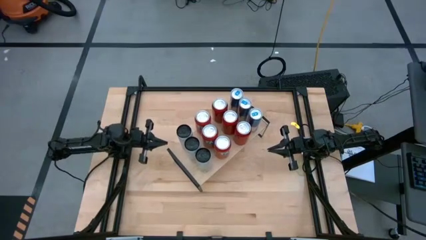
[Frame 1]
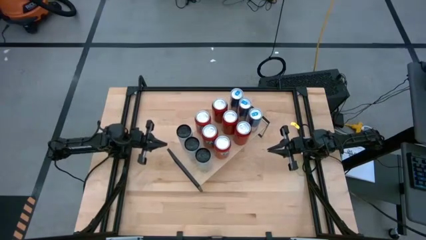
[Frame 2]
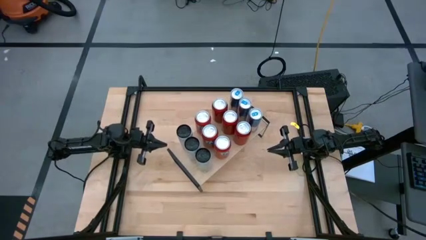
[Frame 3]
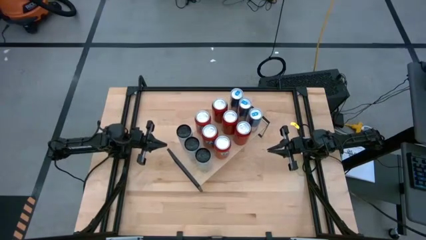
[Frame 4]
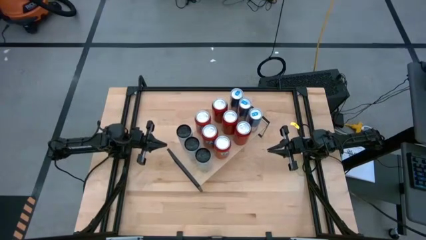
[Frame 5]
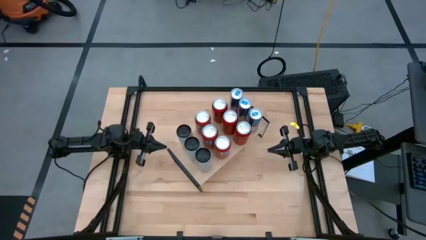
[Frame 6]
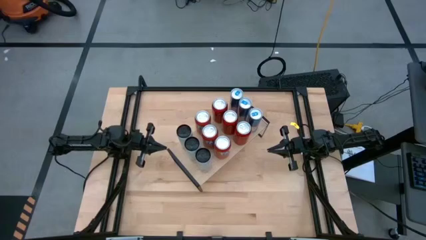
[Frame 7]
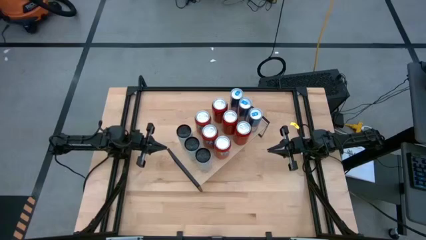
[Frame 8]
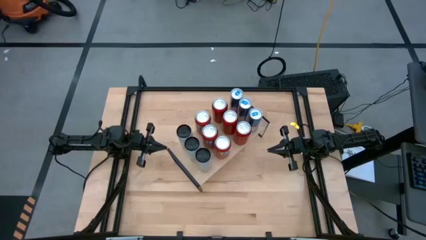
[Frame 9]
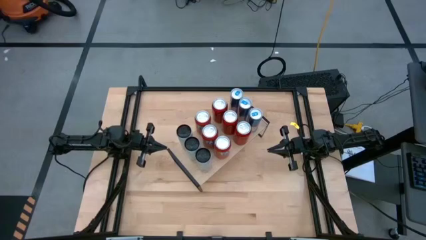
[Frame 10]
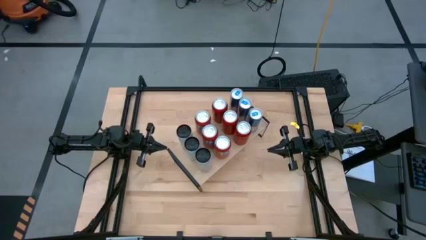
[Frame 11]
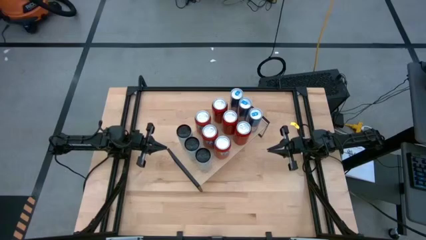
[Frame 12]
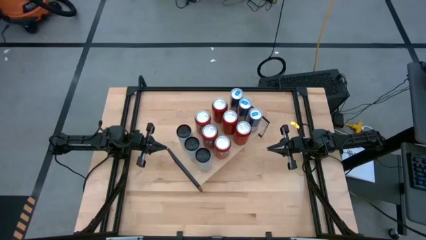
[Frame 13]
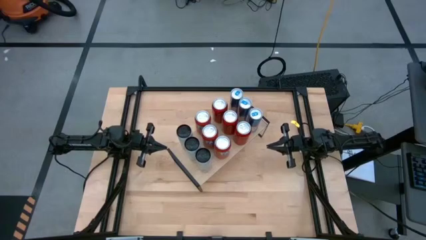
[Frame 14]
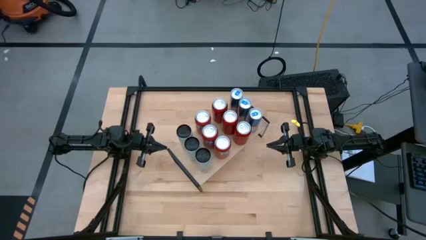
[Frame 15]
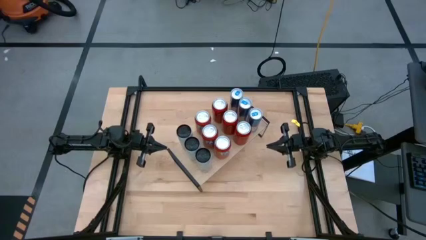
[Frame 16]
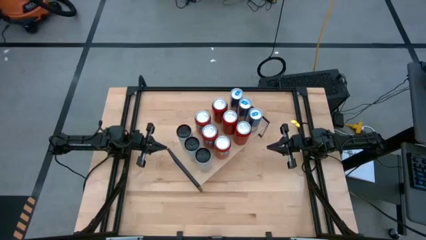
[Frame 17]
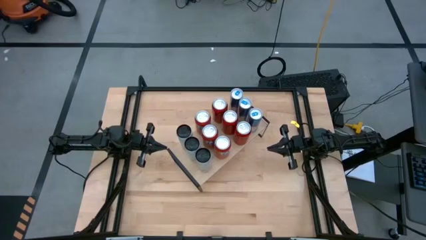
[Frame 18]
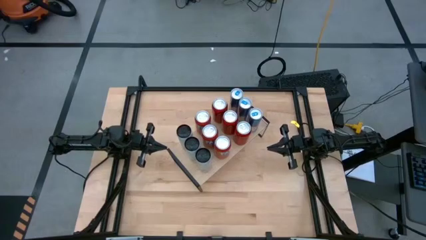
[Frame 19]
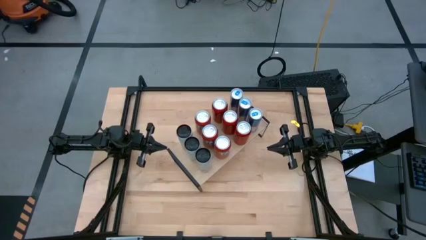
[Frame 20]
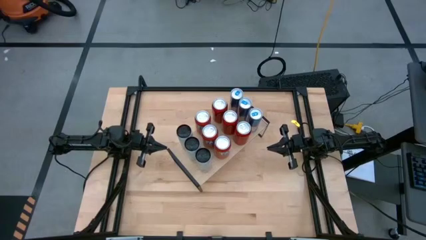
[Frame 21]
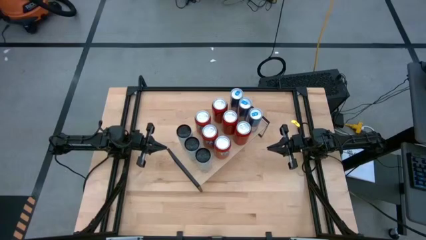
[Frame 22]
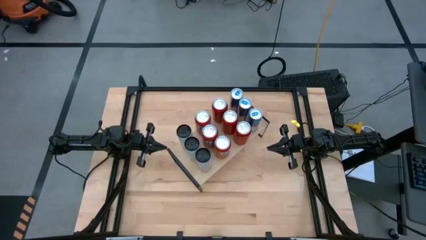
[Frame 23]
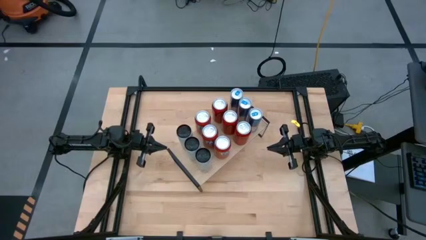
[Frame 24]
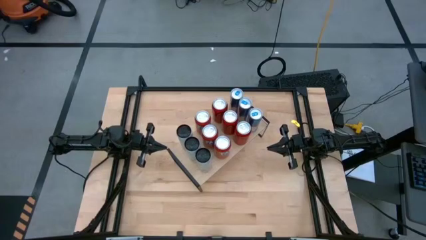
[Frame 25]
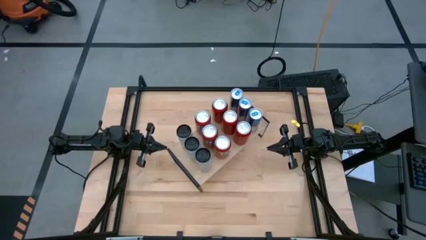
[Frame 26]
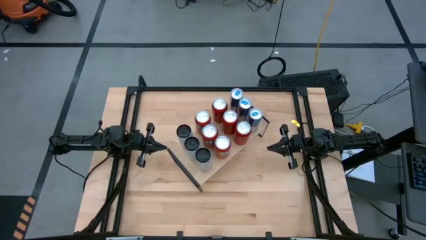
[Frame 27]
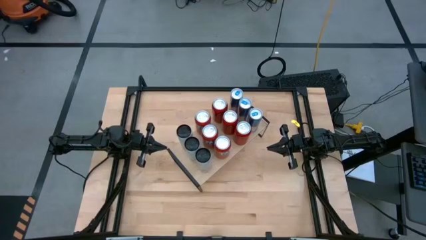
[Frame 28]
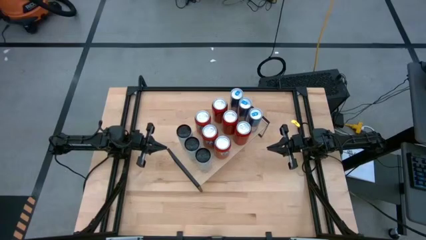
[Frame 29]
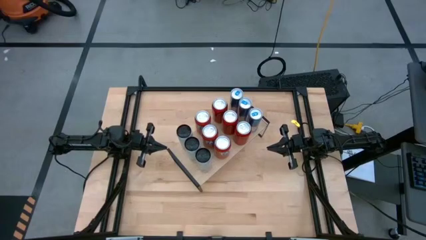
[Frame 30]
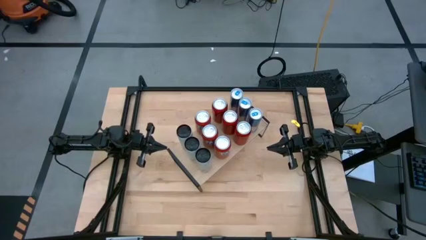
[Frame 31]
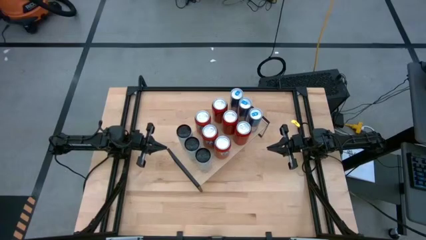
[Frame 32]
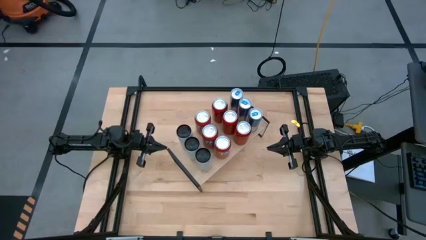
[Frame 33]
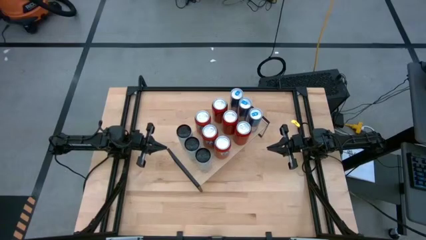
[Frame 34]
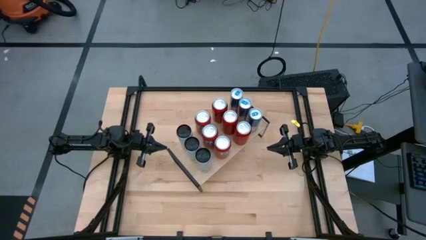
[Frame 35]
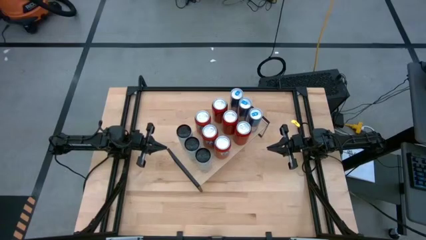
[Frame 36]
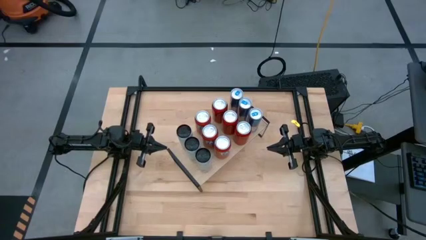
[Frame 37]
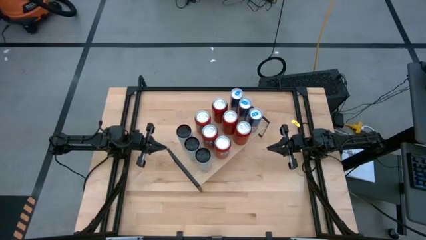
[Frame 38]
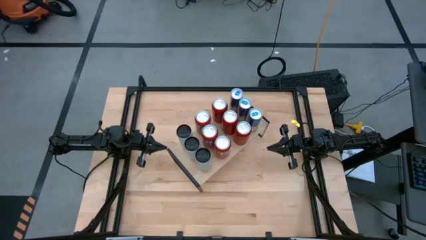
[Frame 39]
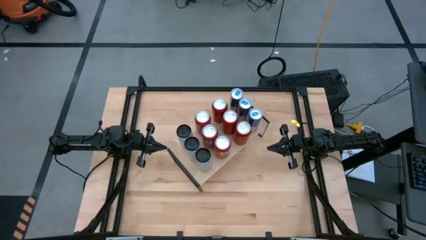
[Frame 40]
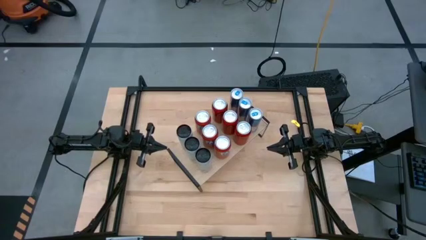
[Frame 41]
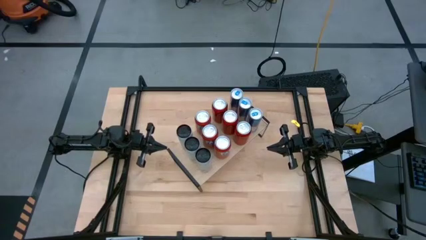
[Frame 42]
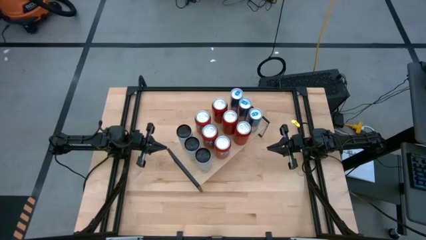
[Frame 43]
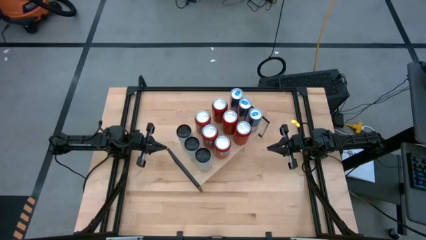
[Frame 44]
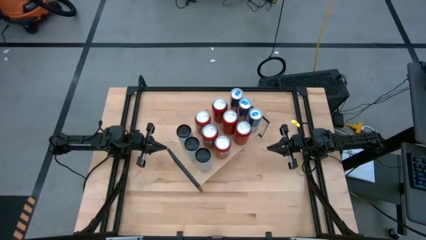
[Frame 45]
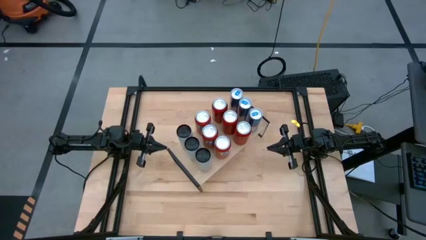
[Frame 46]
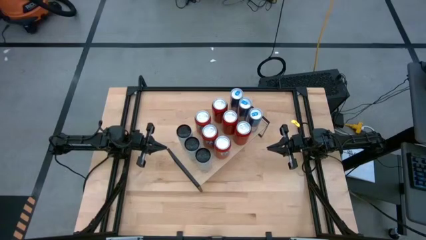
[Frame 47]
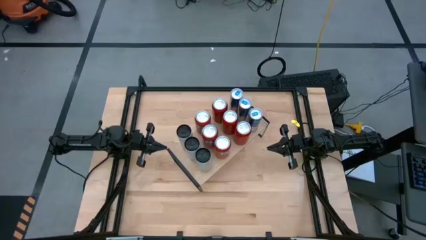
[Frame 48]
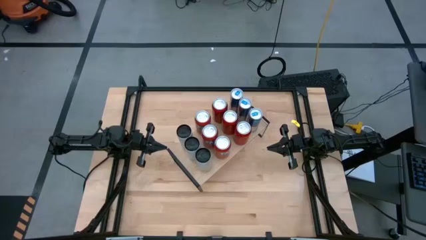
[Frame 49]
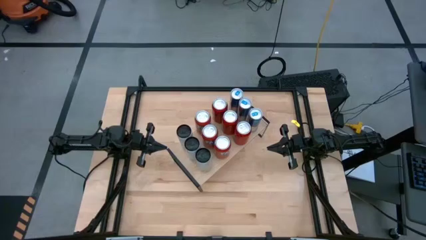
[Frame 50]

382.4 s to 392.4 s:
Task: Place canned beverage on shelf
Return to Home Position

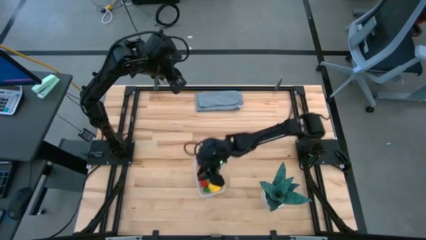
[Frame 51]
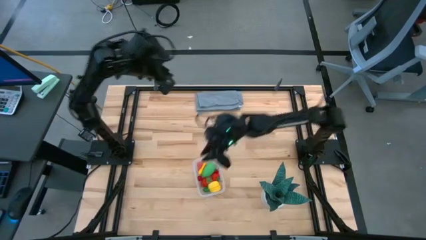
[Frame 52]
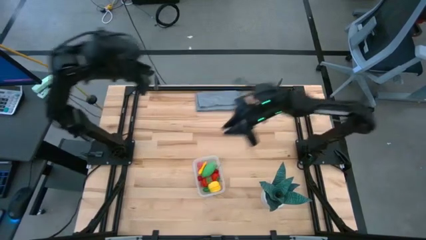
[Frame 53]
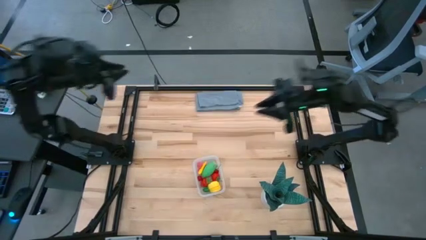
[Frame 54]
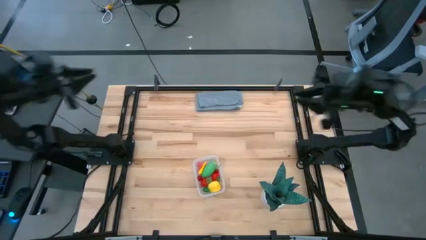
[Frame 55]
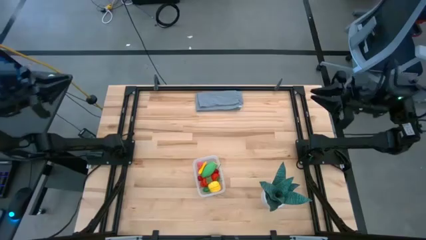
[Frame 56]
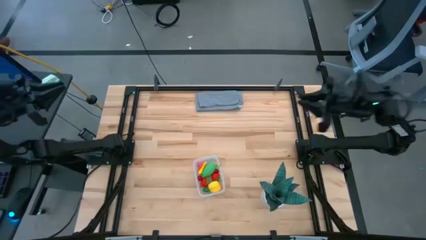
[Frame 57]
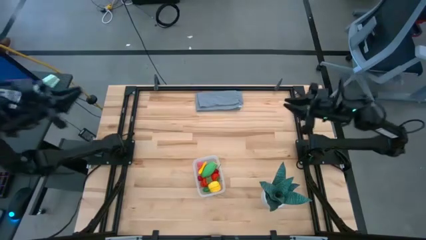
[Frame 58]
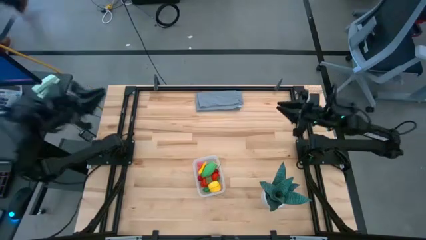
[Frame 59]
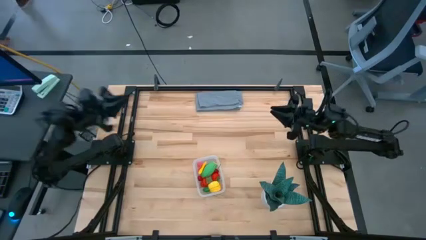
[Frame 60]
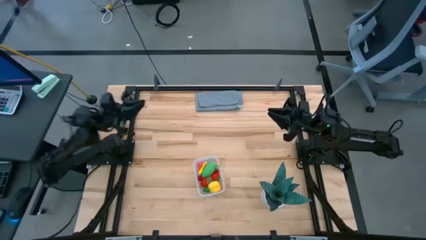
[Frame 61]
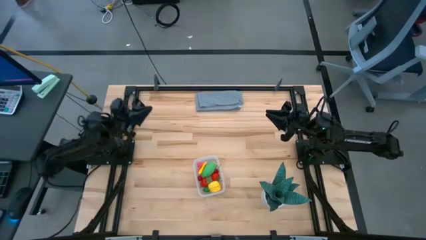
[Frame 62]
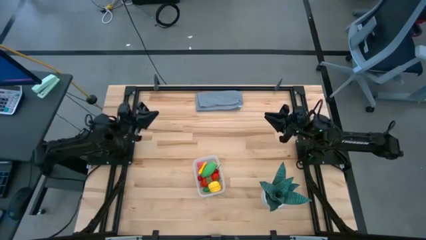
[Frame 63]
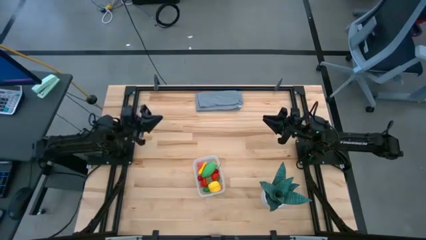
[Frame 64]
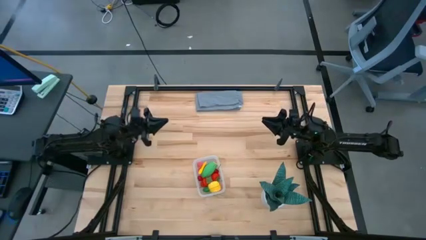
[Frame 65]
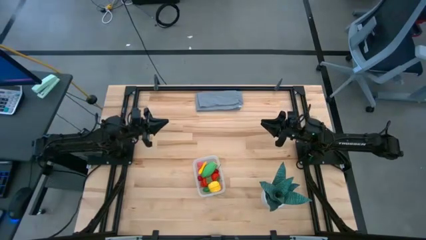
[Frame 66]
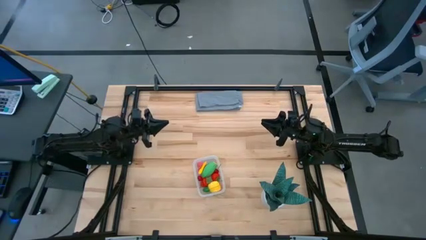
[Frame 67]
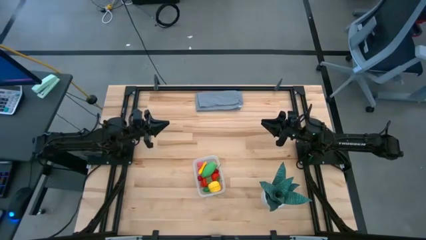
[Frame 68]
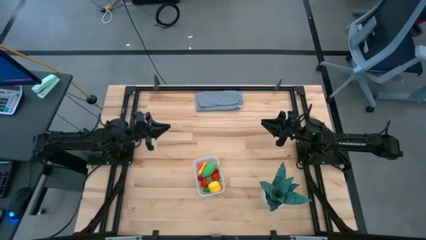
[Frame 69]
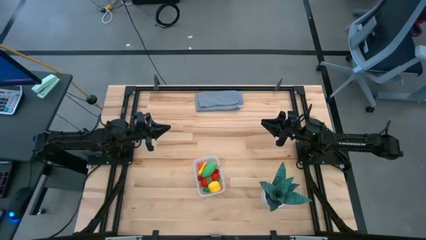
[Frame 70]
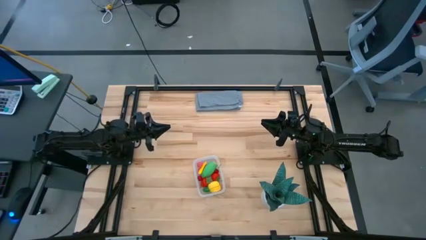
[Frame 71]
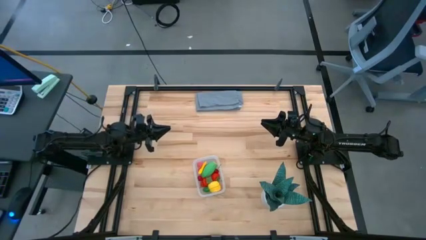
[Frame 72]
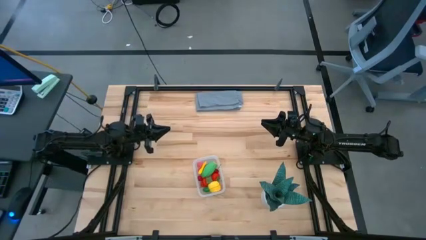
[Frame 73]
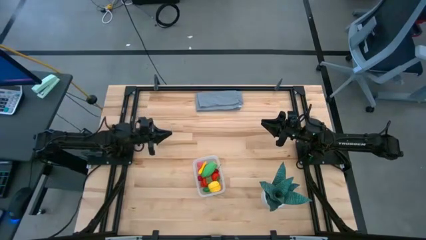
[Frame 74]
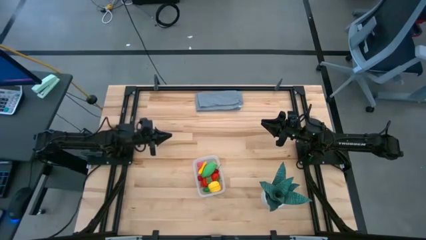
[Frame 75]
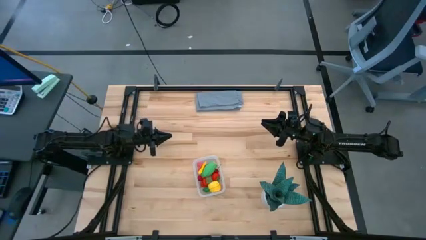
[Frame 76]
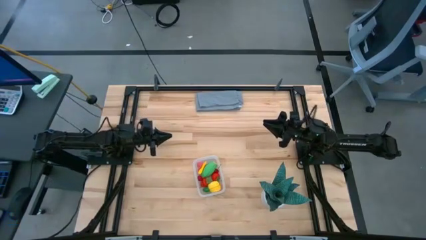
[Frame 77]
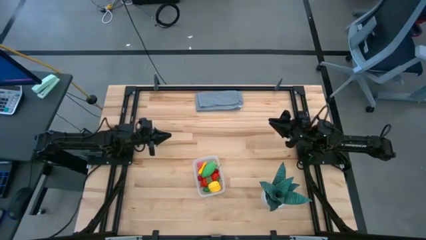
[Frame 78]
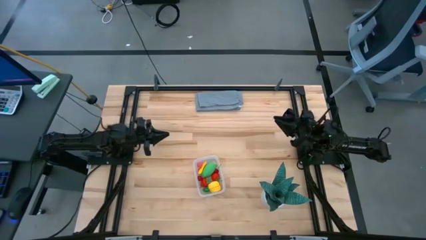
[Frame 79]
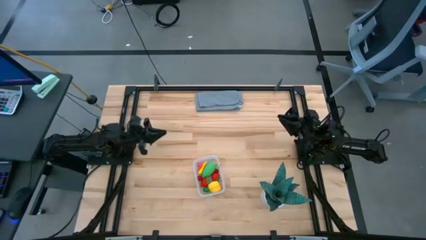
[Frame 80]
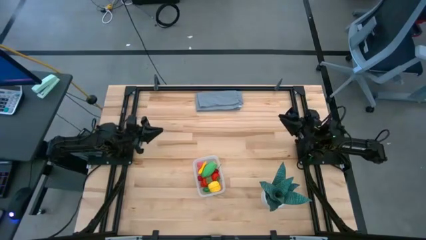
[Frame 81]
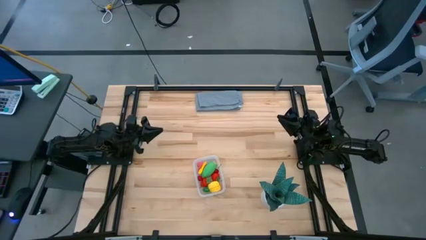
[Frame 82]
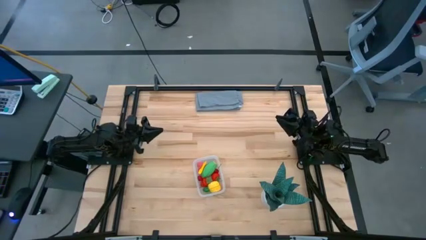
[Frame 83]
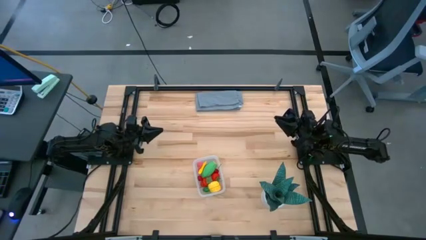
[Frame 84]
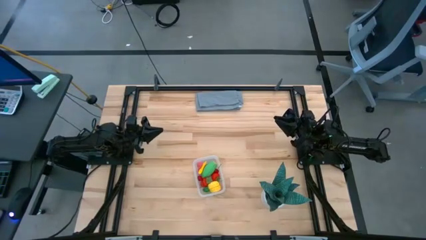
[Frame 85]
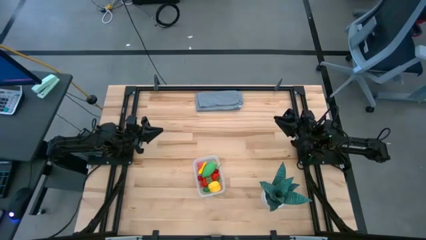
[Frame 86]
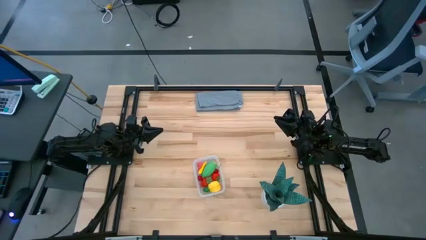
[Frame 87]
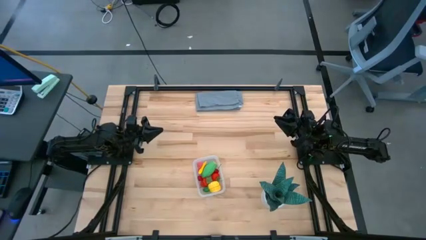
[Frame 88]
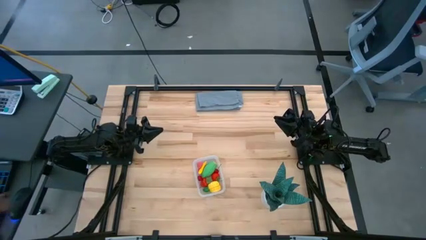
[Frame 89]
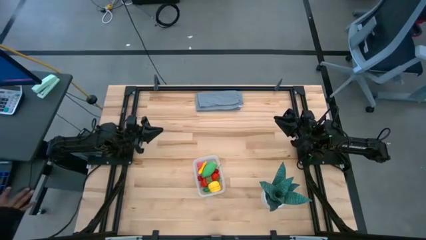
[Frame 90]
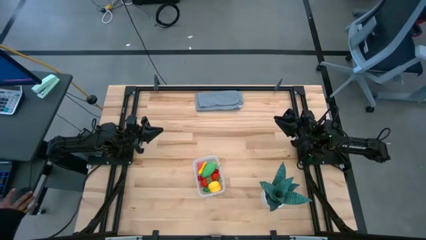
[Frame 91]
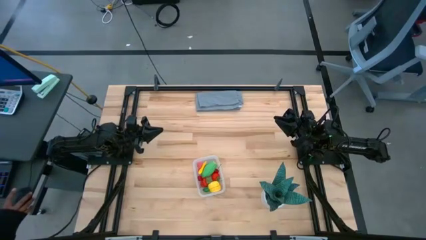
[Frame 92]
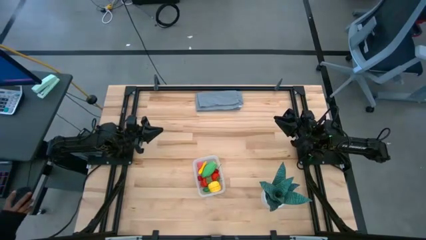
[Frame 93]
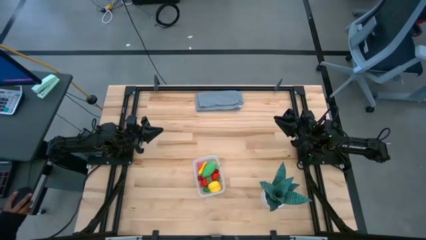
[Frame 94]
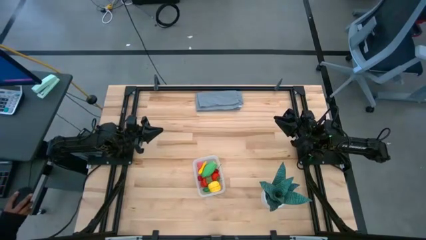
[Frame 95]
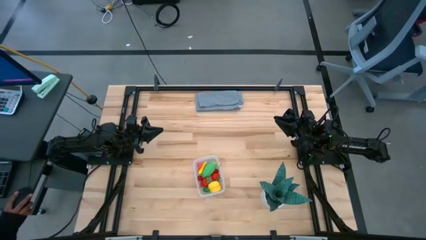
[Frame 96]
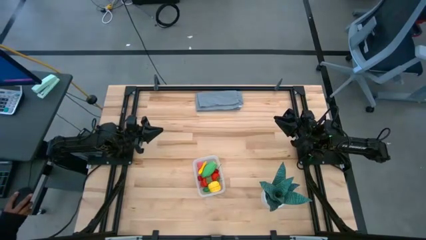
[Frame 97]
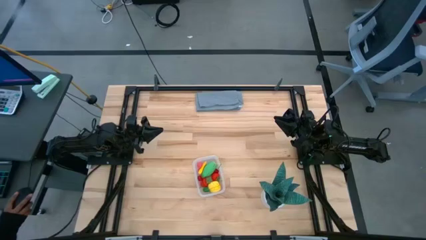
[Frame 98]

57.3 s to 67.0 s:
Task: Pick and placing Produce into tupperware
Return to Home Position
